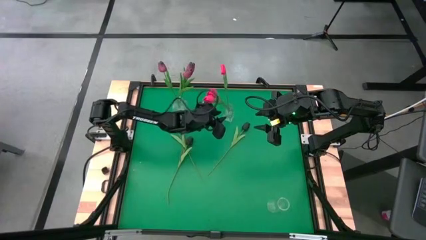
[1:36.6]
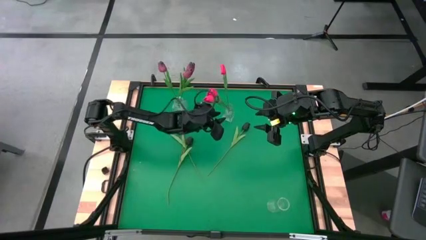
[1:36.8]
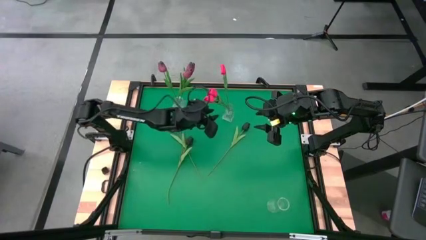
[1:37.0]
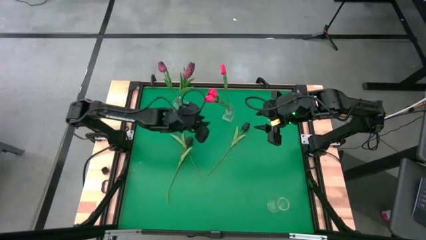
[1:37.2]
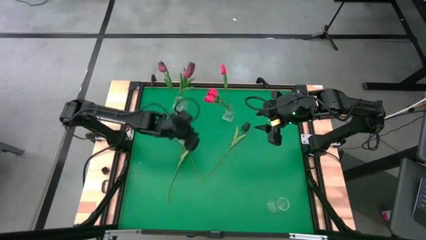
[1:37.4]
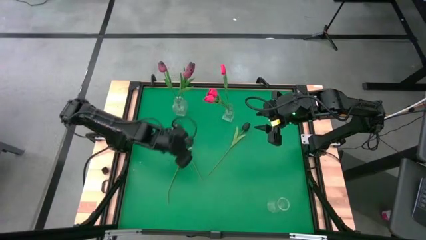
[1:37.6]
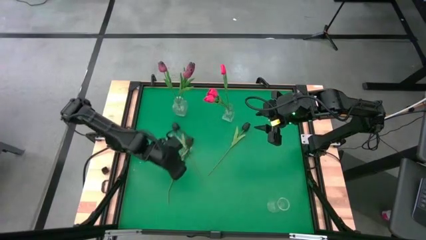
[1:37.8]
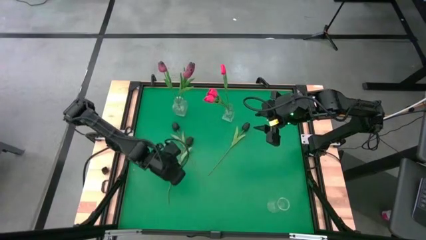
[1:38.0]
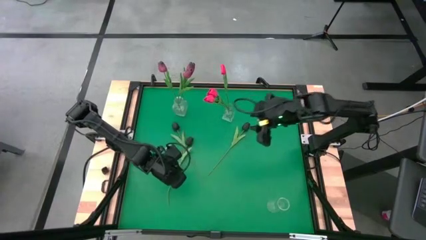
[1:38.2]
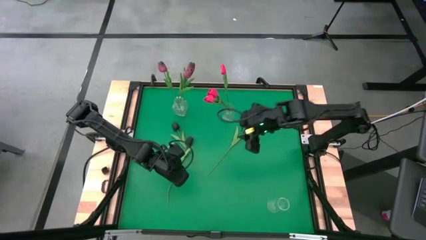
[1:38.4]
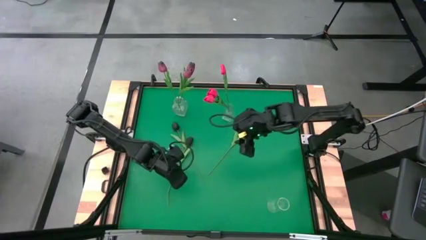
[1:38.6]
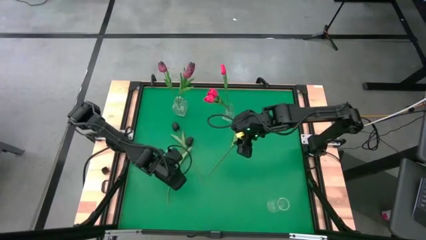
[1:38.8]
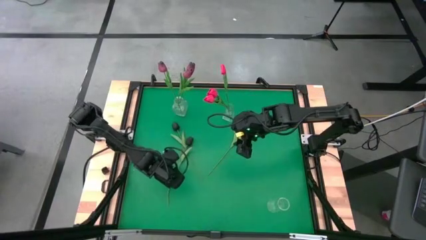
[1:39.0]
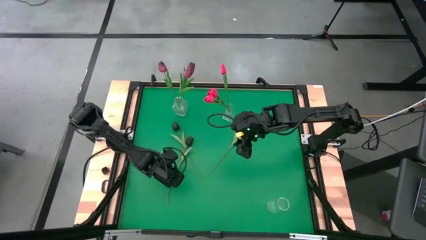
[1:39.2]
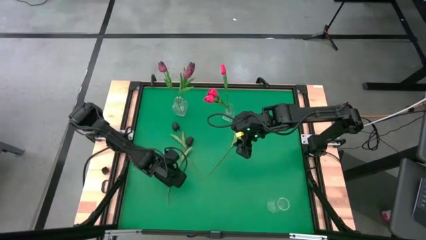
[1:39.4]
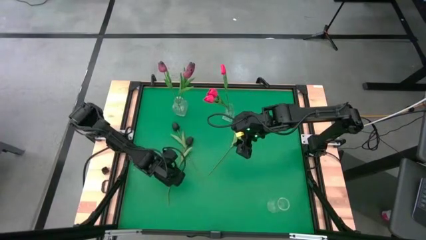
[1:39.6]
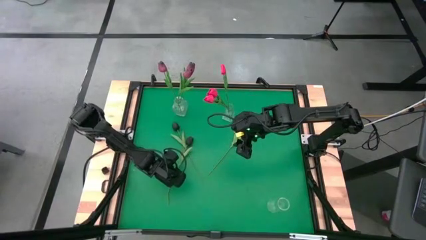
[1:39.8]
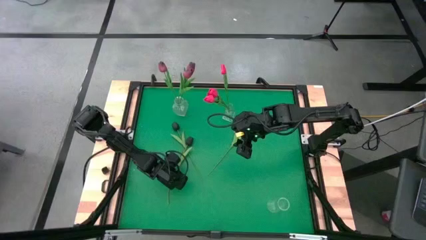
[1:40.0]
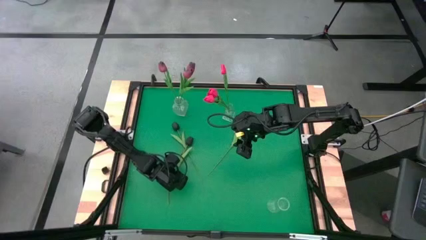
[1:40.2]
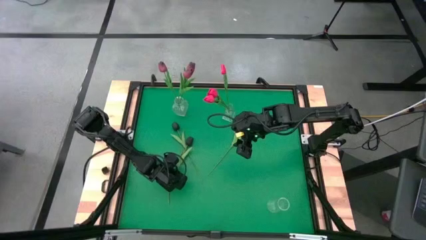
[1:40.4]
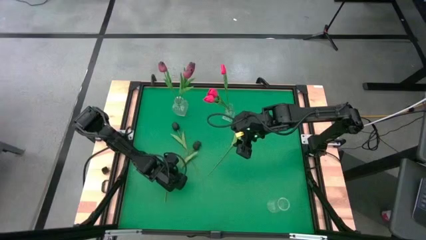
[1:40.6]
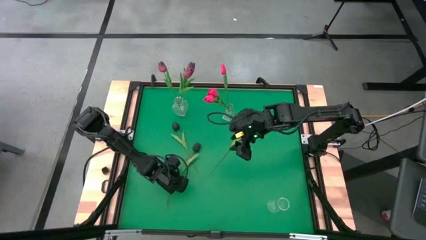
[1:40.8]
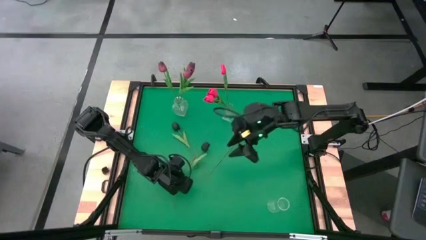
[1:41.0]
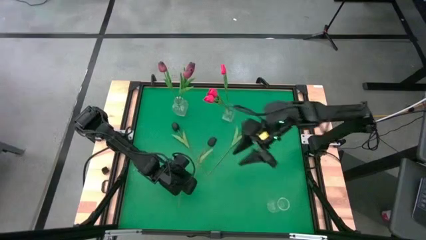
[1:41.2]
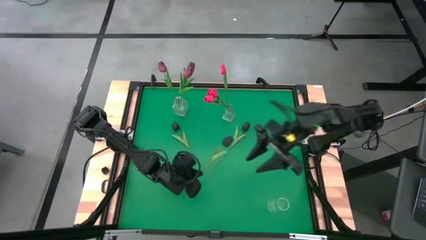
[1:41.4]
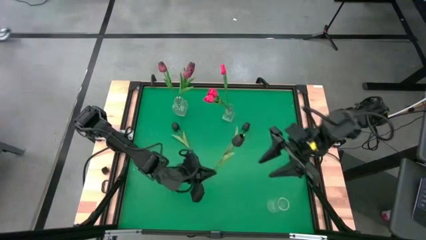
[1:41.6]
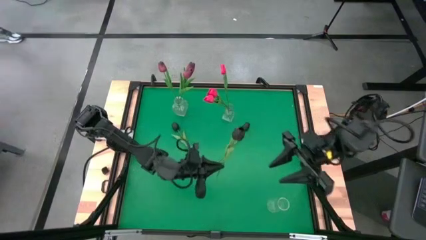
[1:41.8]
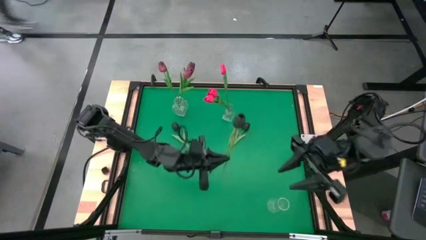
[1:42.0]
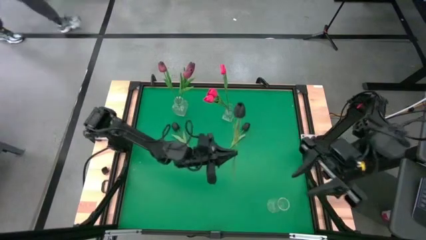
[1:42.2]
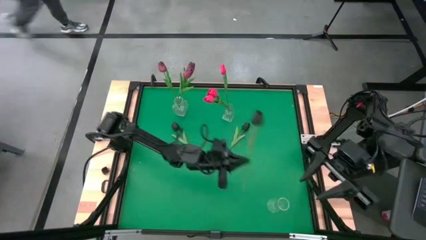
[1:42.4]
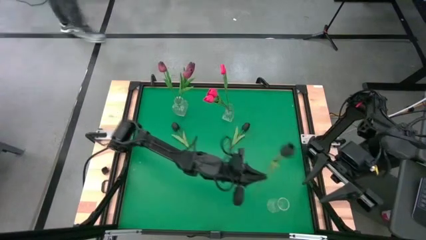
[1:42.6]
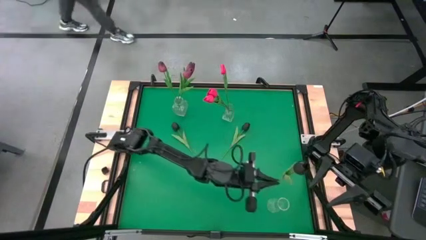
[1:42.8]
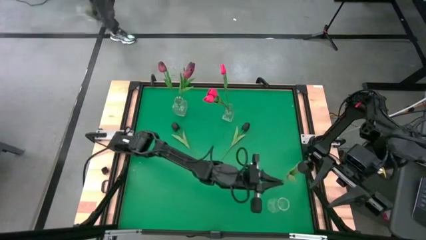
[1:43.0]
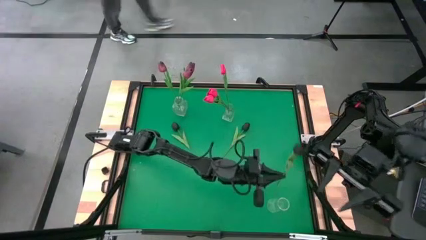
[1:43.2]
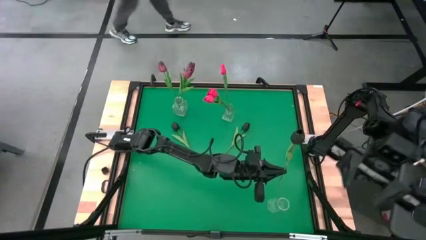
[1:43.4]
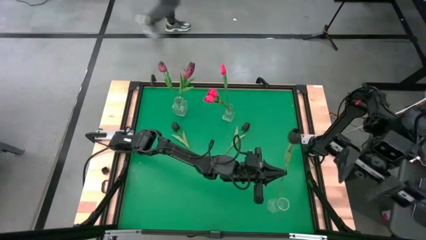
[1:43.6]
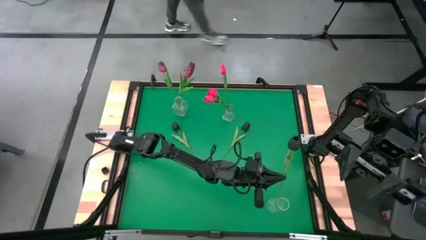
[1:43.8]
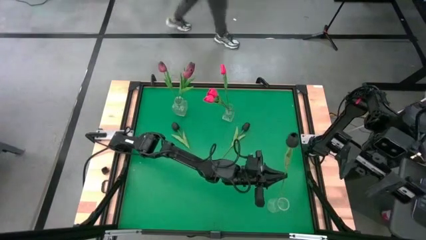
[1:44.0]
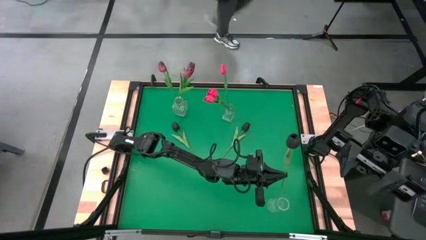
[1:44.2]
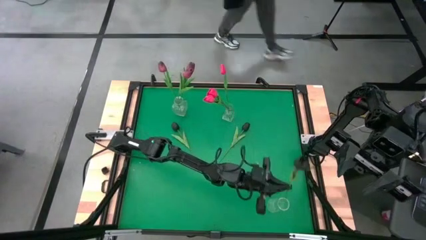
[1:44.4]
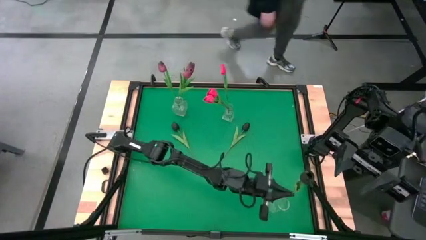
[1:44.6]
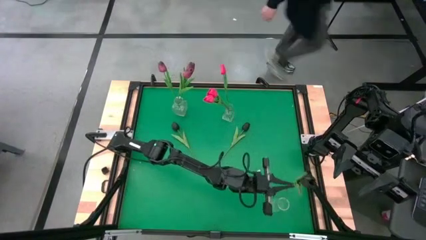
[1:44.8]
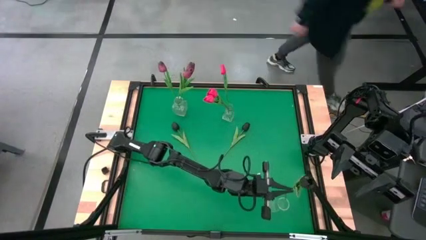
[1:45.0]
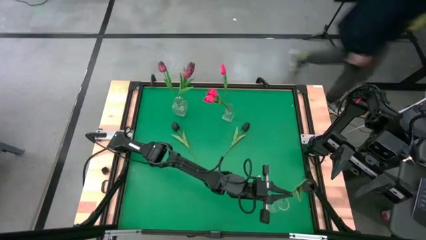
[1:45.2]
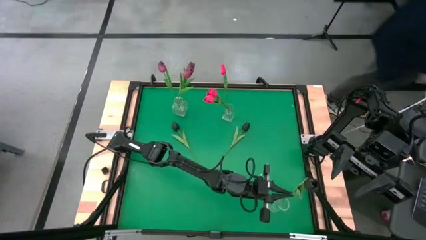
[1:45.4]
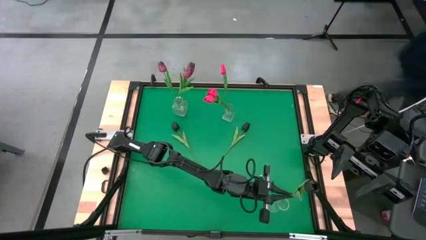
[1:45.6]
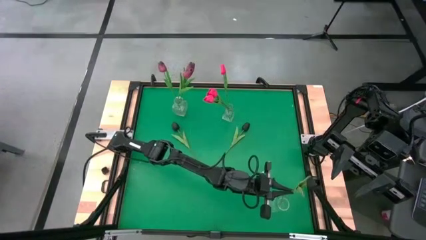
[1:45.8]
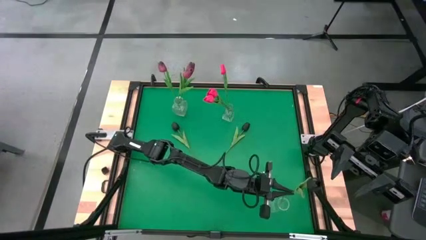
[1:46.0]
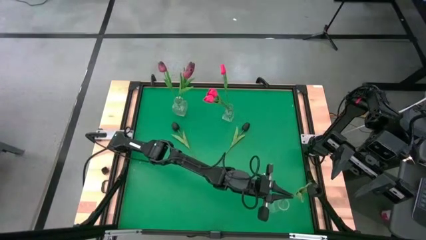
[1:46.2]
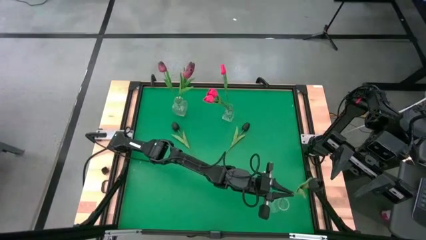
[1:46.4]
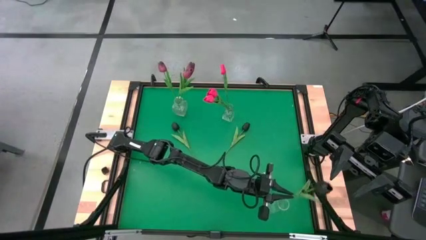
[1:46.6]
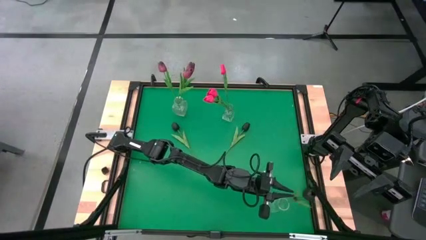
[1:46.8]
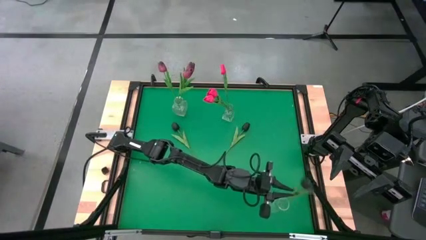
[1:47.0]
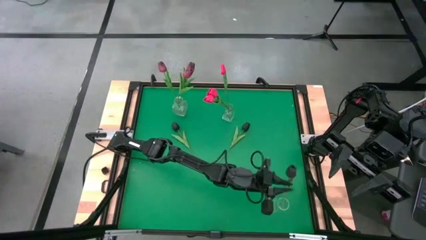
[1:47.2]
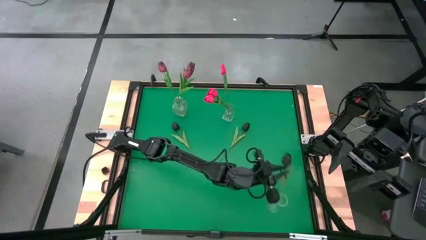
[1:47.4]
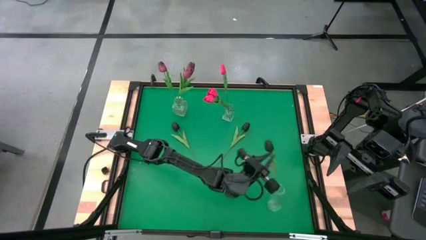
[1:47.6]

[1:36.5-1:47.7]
Task: Sort flowers into vase by color
Put the bottom black tulip into the bottom transparent vase

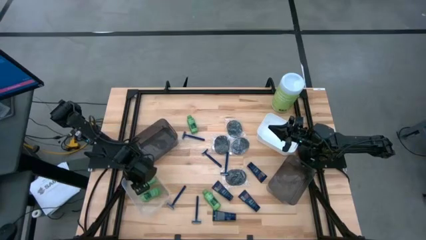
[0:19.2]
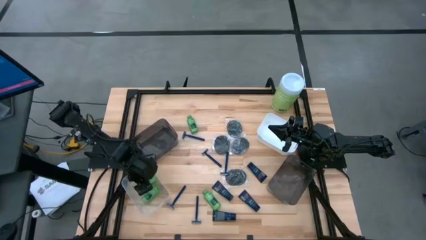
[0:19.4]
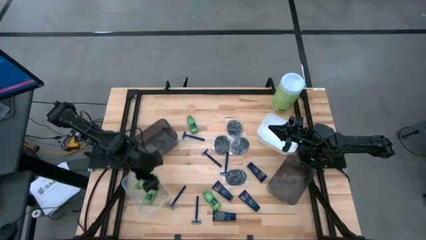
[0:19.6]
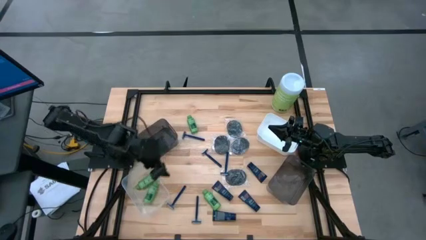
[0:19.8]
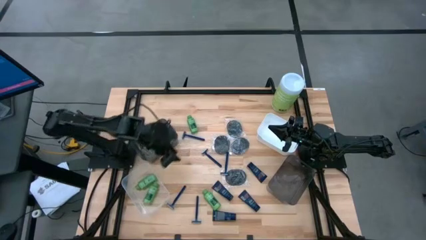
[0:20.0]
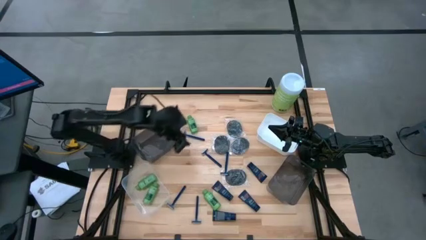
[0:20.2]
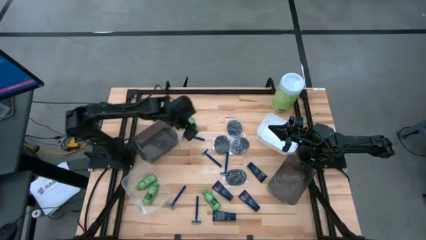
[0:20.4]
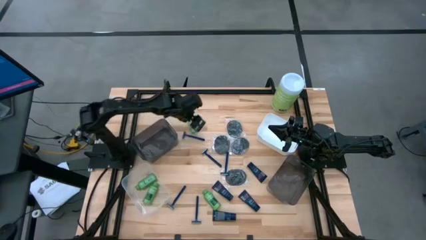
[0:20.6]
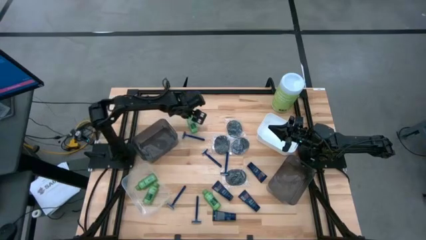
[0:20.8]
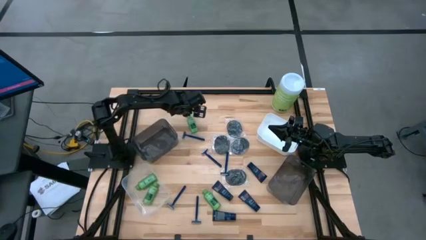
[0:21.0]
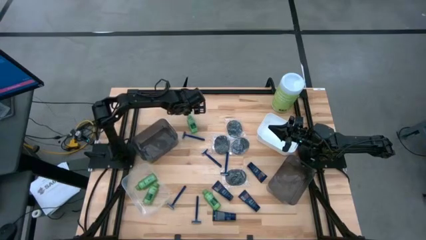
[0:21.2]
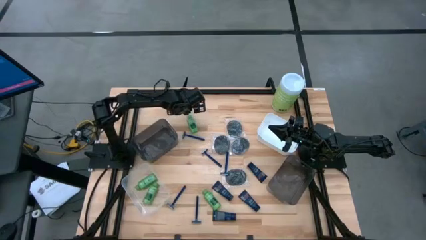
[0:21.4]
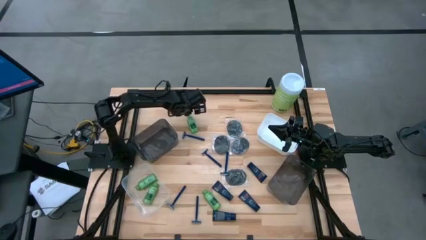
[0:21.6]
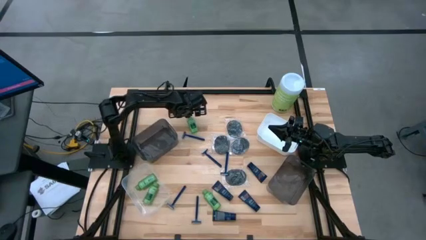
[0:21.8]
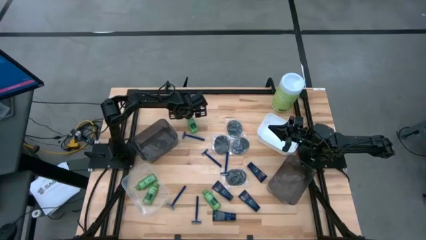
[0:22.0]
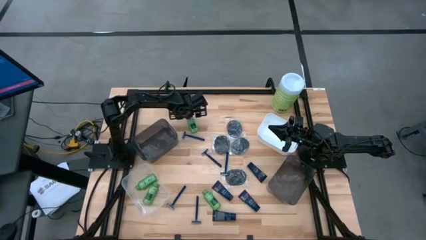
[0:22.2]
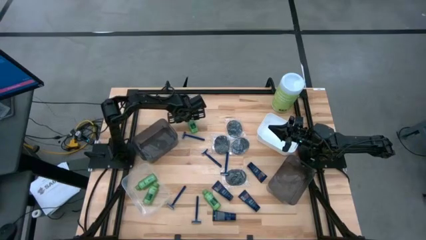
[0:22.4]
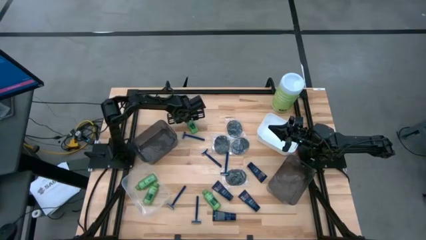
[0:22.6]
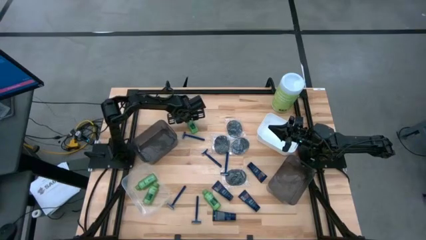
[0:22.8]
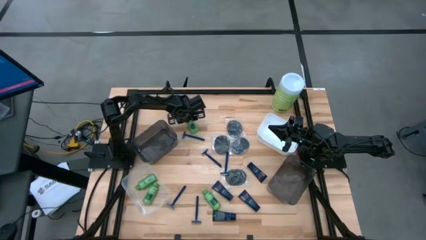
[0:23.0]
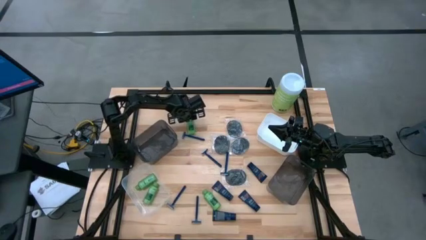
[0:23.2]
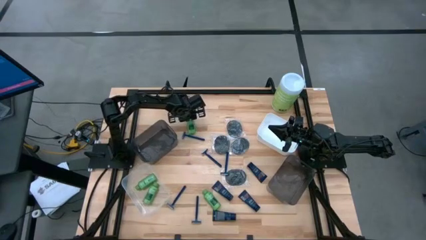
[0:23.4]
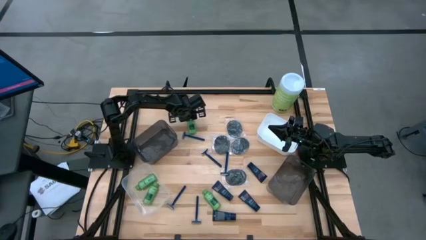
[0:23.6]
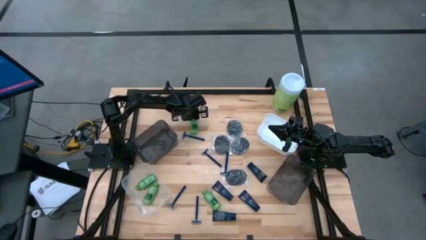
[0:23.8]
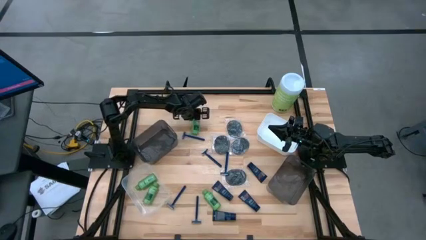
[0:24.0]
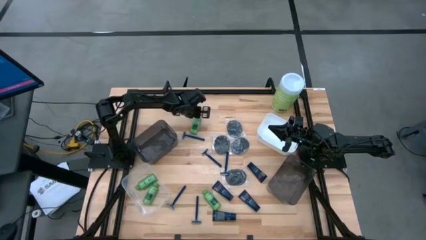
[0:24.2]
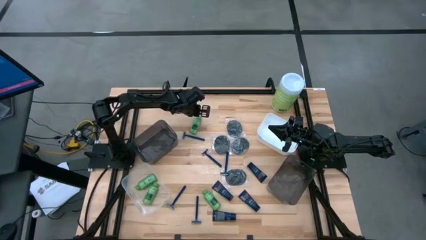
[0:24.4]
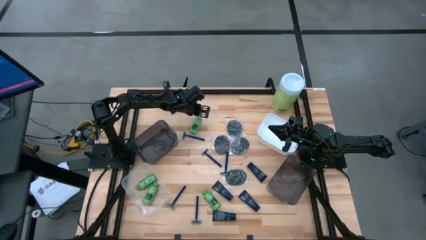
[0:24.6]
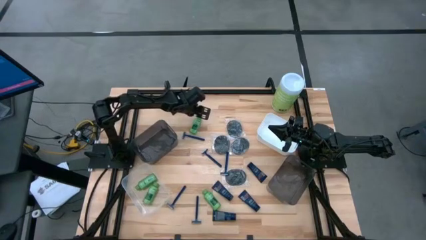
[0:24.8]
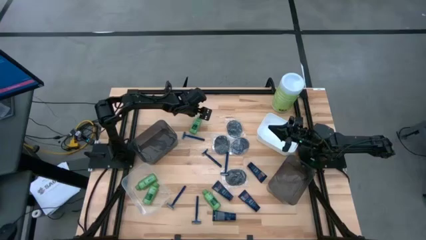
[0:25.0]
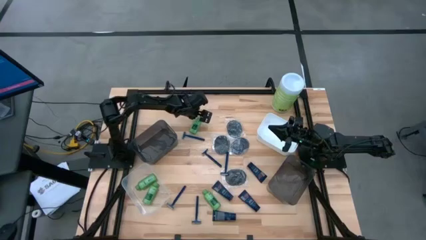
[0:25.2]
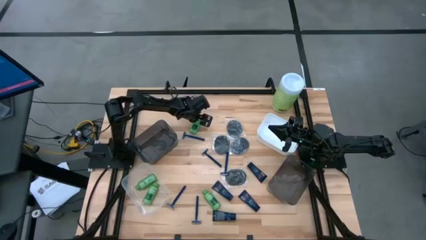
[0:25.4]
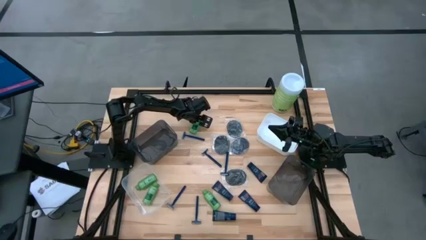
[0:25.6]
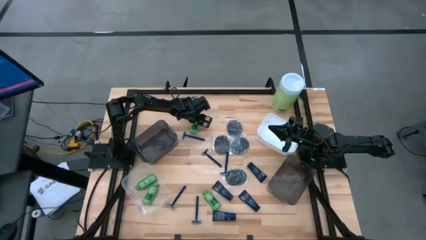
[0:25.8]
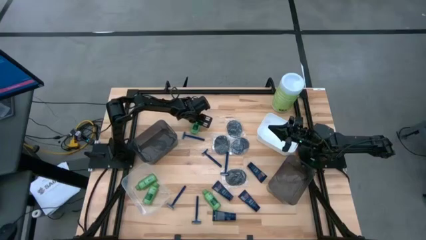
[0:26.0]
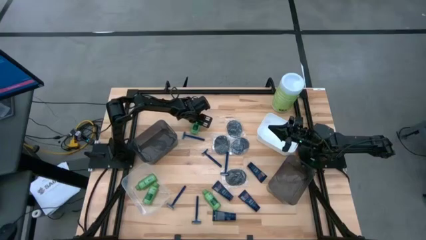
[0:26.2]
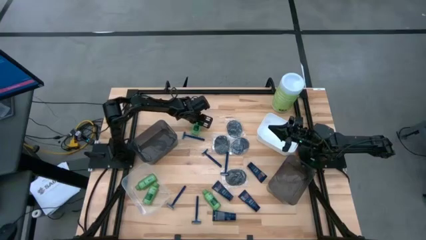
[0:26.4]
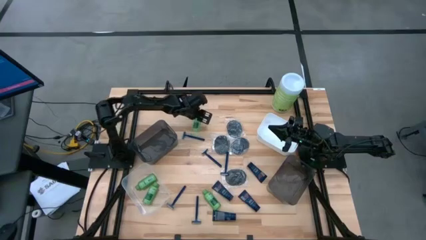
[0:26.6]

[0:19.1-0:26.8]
Task: Pick & Place Travel size toiletries
Put the green shampoo into the transparent bin
